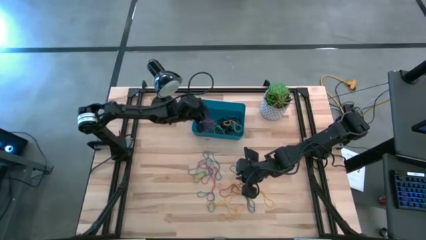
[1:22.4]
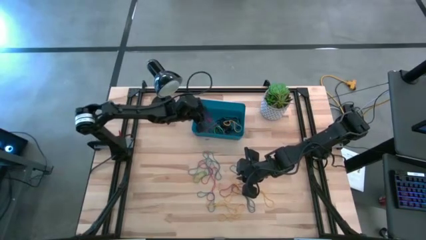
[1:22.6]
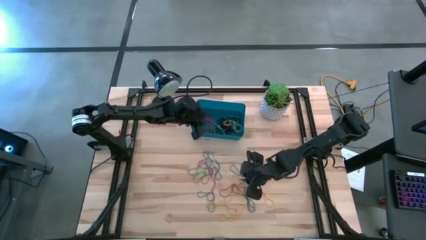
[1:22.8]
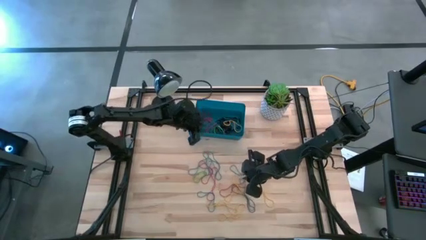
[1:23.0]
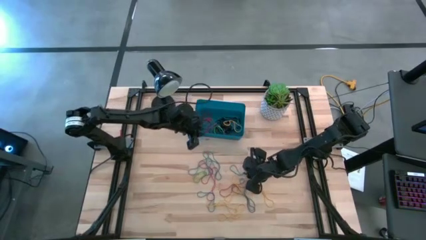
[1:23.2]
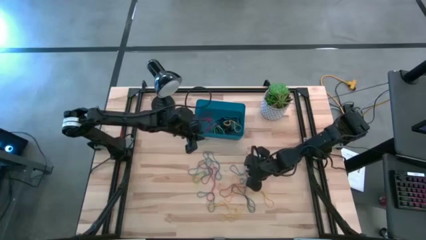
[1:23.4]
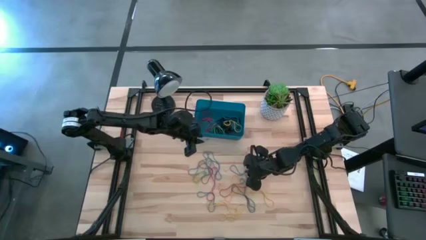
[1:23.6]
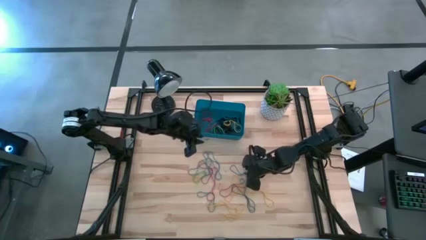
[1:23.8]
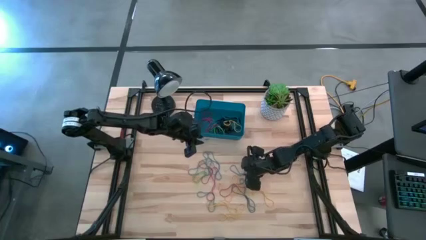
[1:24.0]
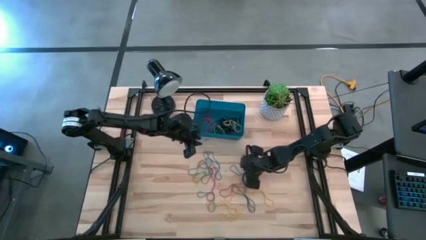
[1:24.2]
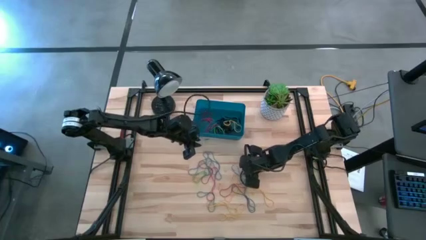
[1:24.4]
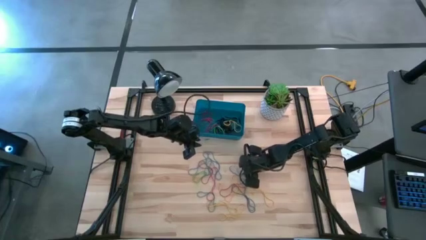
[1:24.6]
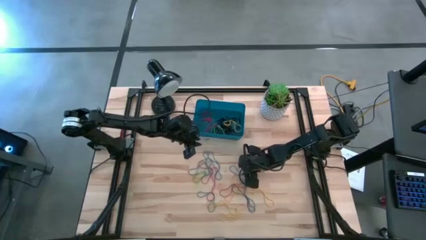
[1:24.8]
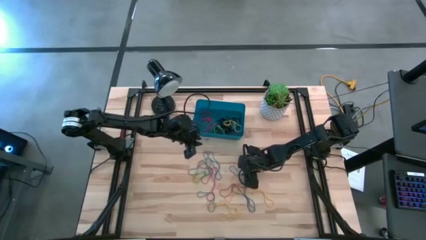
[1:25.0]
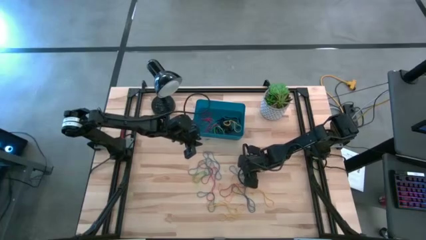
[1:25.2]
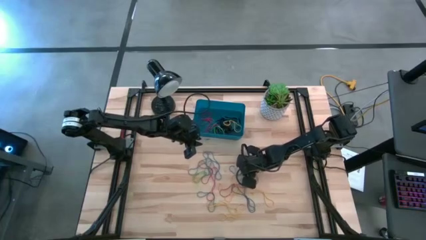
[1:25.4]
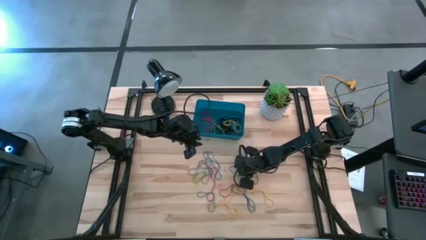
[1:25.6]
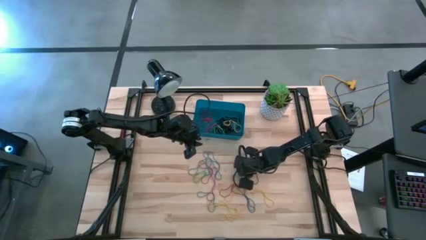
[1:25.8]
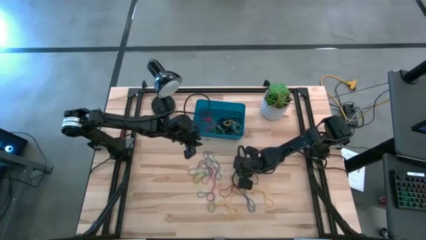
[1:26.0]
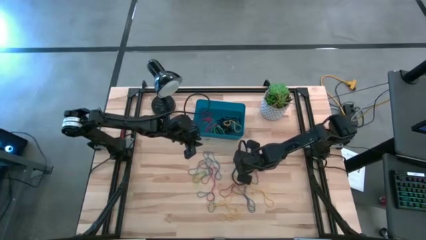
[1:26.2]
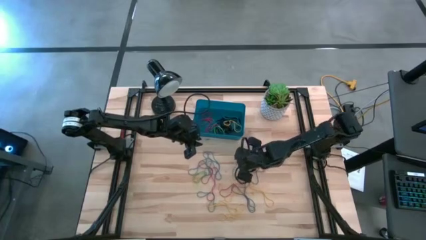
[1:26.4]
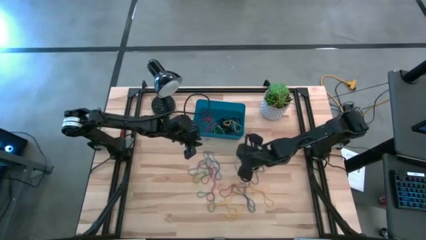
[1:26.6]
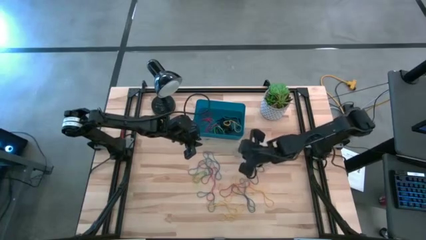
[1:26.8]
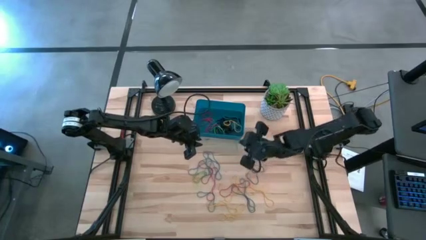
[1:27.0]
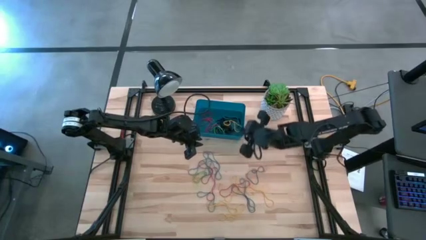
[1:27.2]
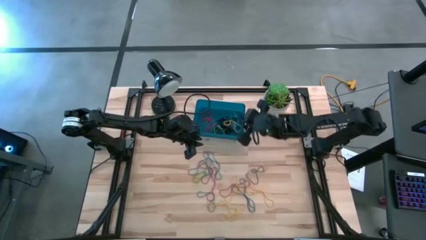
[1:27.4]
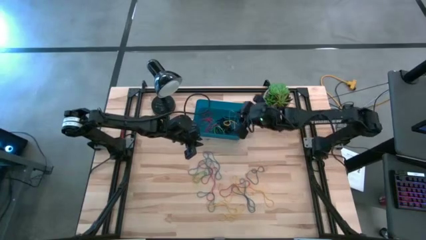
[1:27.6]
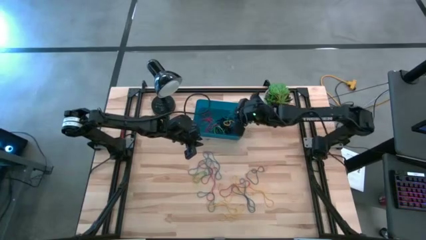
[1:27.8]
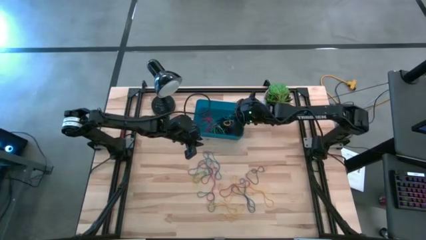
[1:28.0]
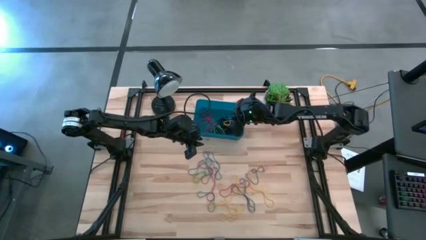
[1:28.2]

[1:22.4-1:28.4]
Task: Pick and place rubber bands into bin
Put the blue rubber band into the blue bin

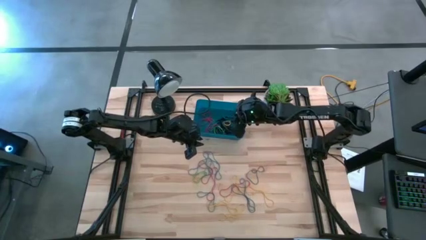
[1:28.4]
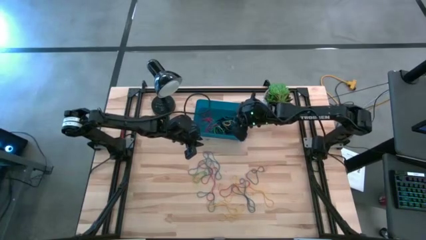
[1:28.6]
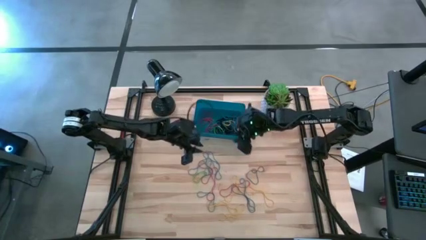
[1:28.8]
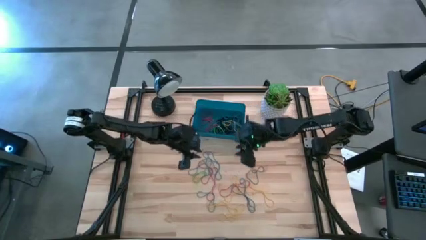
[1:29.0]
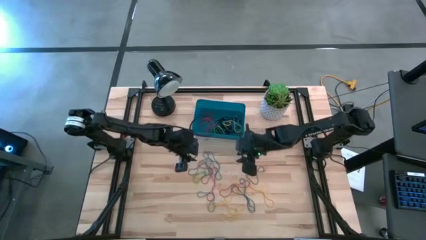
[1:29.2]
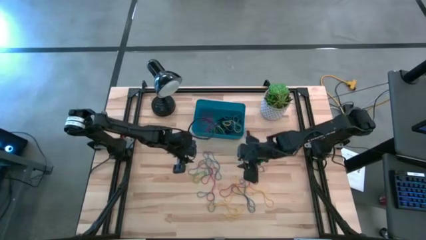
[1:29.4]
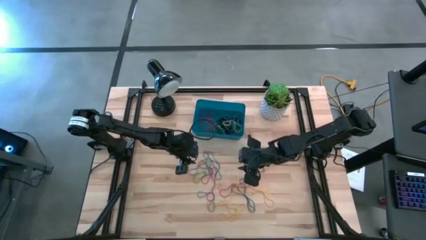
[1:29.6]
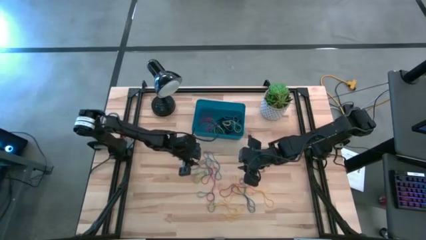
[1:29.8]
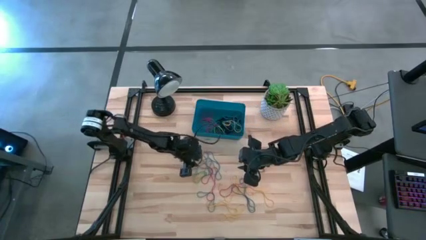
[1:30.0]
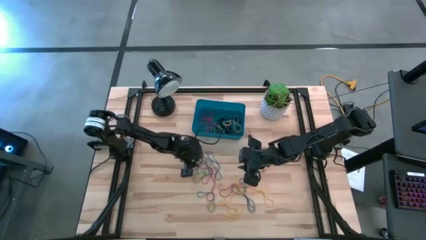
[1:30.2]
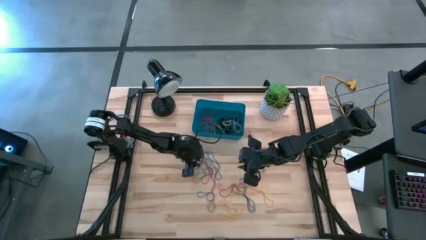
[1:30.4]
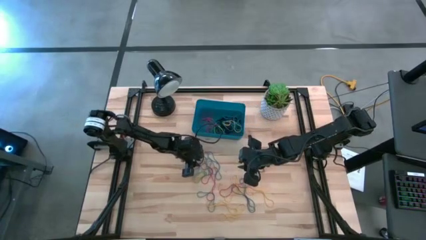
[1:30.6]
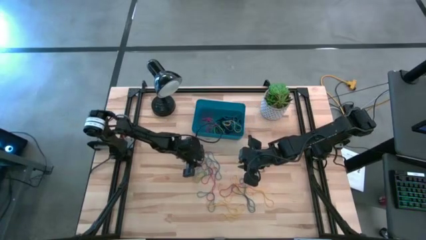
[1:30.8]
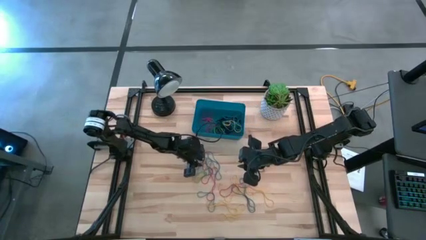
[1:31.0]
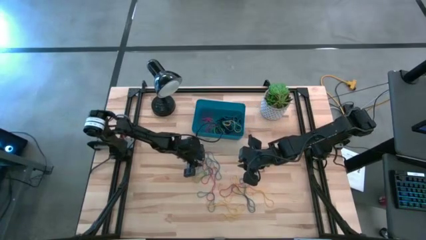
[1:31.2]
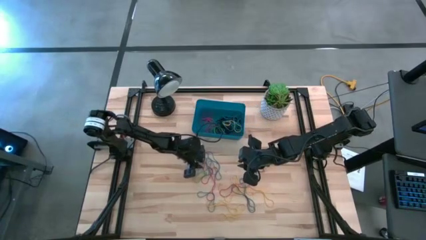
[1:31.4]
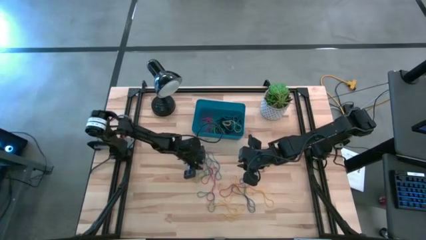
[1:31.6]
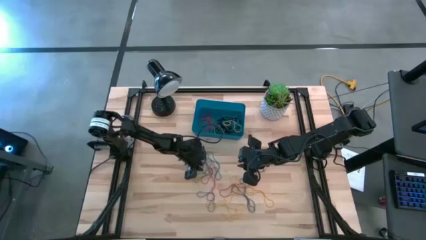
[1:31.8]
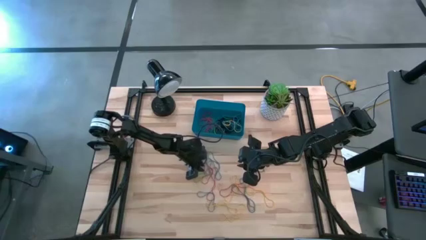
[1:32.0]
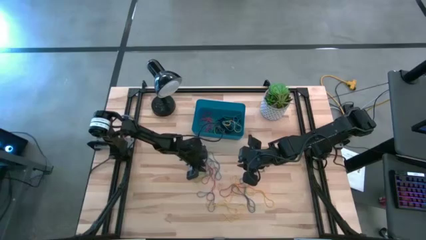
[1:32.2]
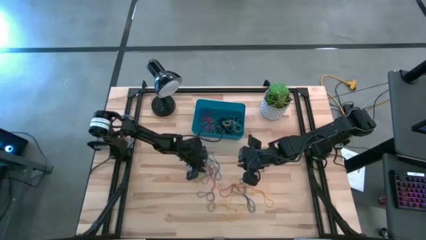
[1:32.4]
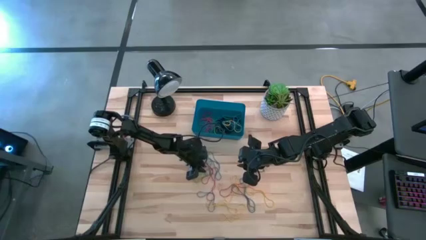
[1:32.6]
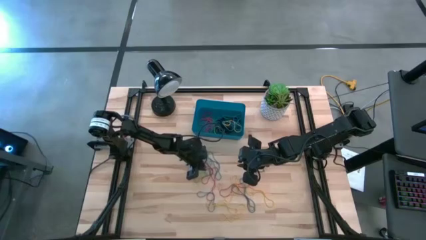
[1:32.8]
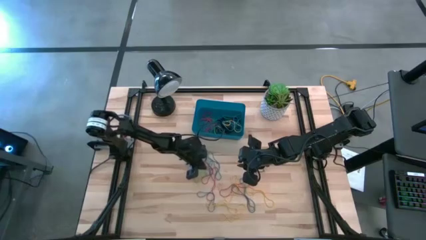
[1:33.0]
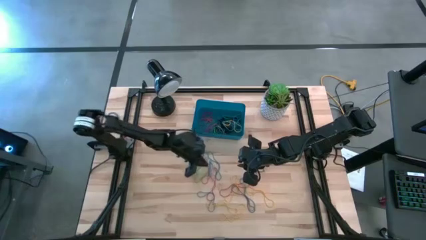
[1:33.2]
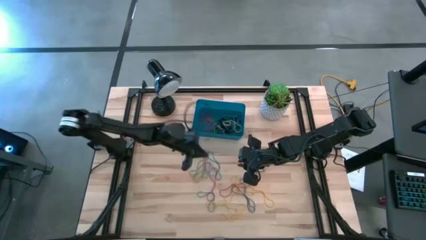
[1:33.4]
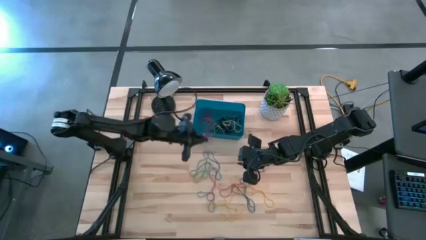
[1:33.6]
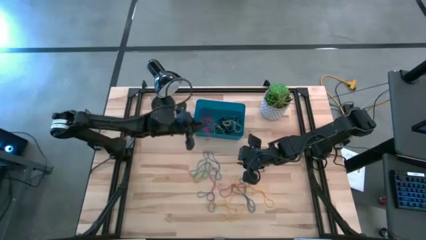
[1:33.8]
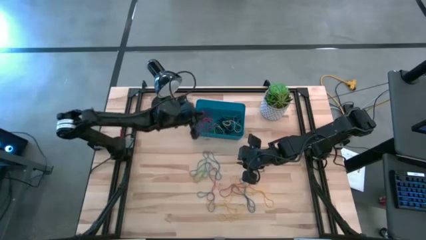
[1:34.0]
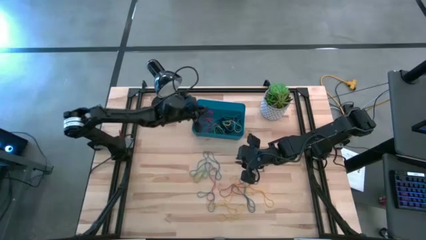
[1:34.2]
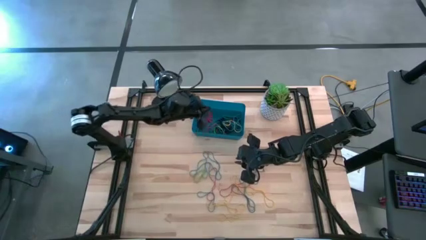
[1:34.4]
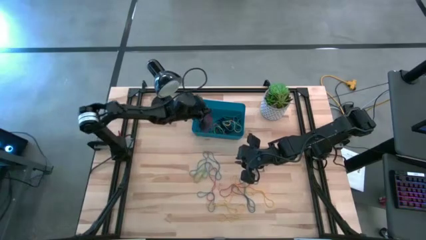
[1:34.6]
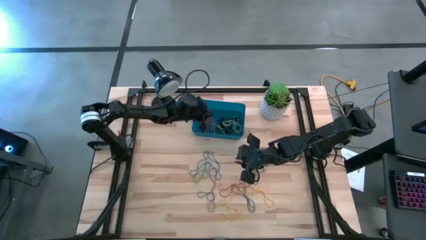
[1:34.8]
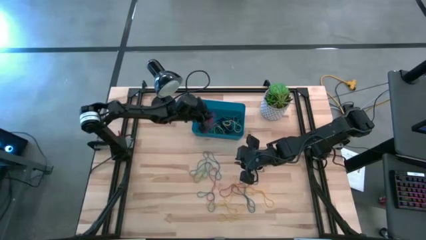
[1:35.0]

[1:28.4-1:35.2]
Put the right red rubber band into the blue bin

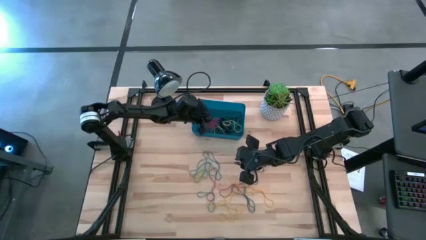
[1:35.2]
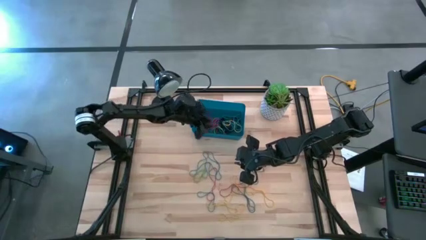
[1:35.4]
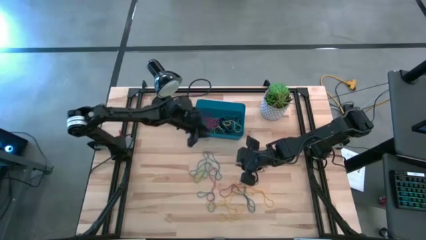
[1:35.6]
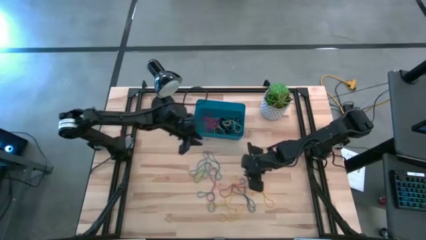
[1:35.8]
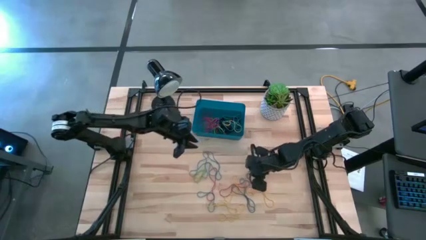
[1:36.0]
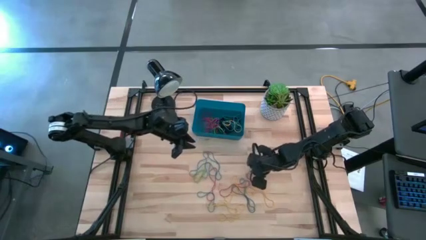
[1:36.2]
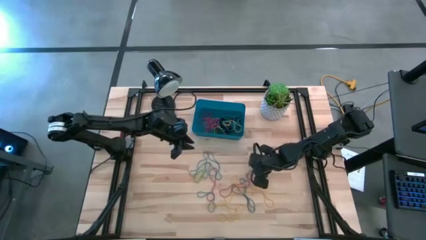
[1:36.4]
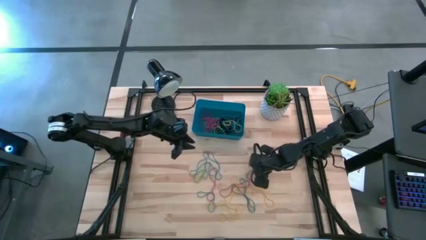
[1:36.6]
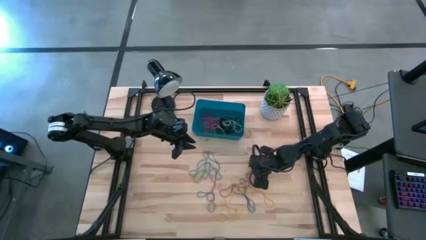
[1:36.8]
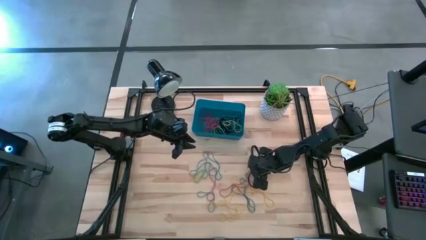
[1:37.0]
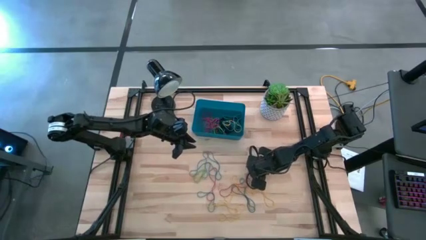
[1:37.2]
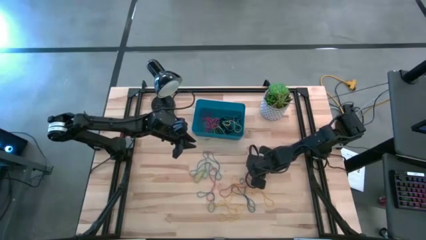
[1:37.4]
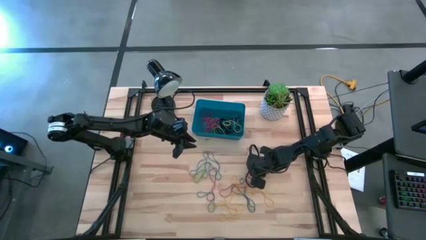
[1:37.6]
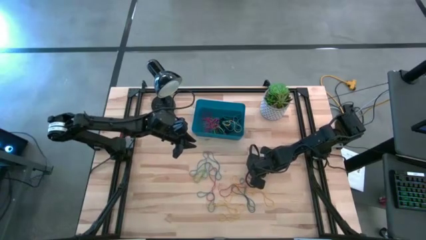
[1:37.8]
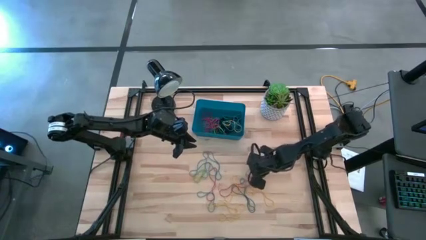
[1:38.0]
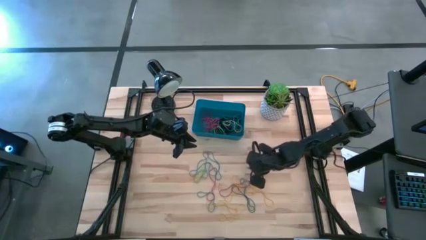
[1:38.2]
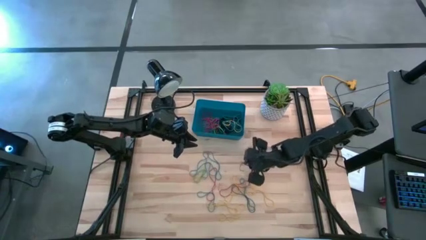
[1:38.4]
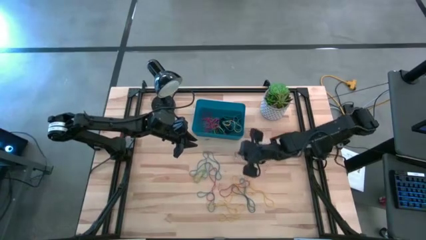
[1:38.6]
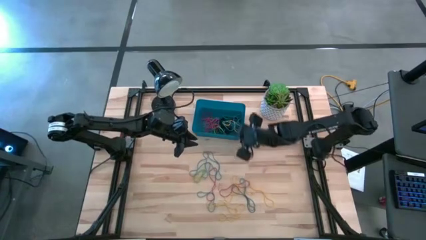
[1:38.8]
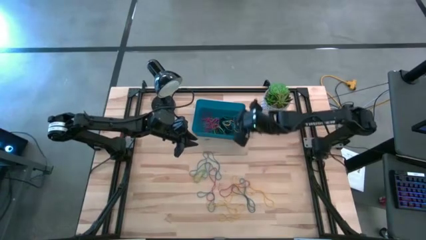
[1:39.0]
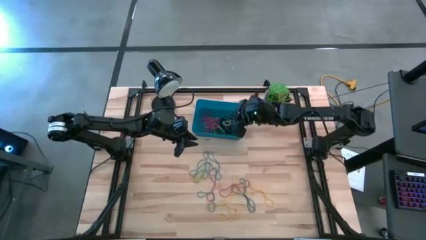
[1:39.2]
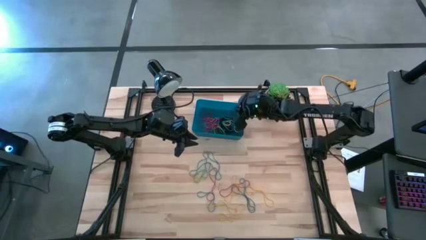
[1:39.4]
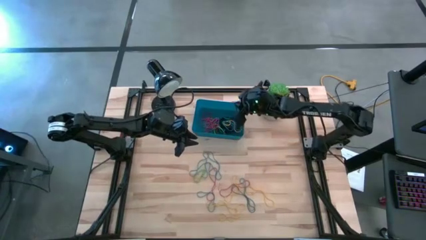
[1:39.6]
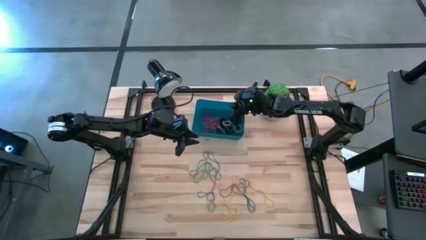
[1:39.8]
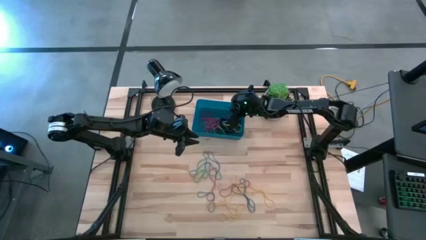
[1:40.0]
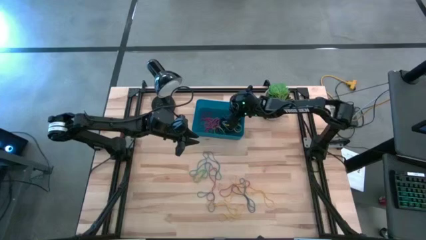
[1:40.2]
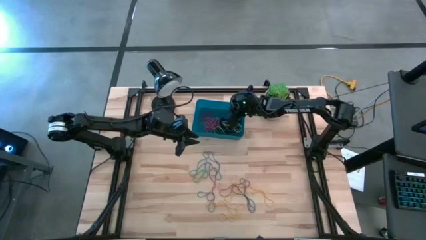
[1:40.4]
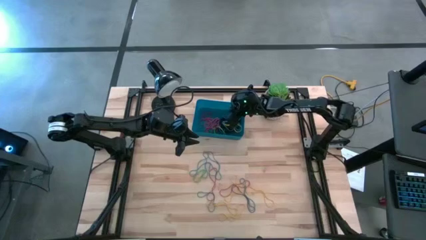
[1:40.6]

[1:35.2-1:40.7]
Put the top purple rubber band into the blue bin
